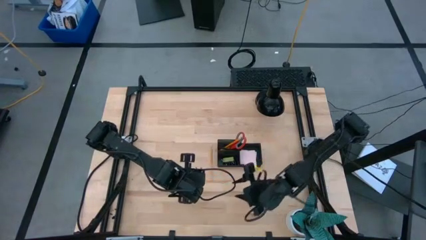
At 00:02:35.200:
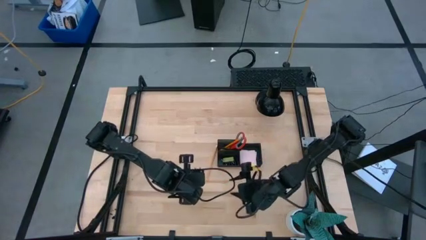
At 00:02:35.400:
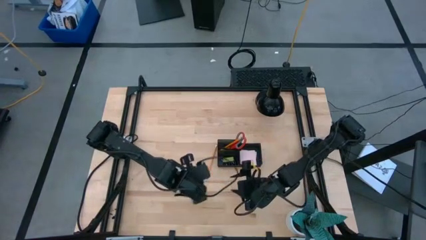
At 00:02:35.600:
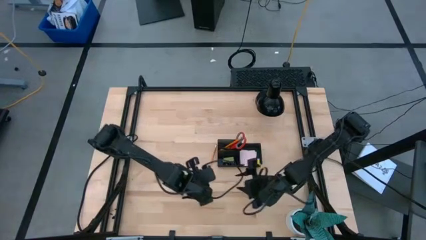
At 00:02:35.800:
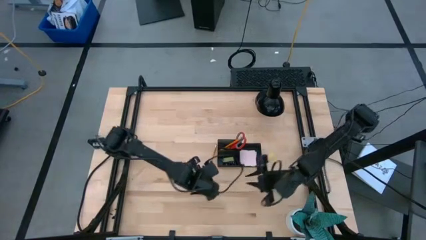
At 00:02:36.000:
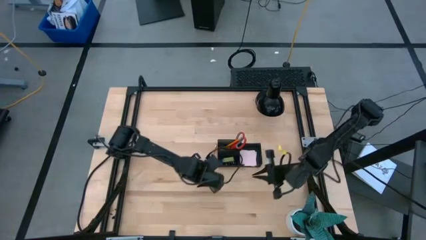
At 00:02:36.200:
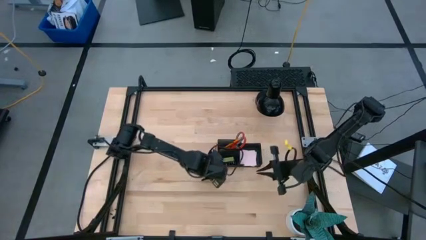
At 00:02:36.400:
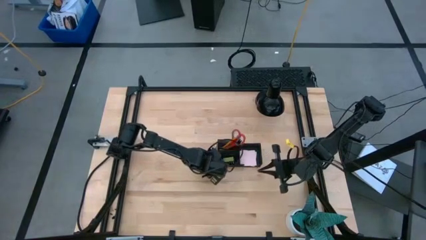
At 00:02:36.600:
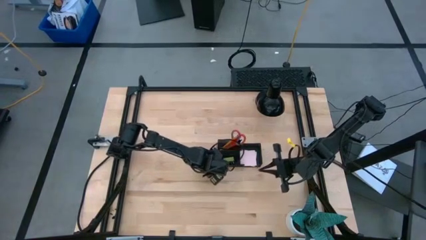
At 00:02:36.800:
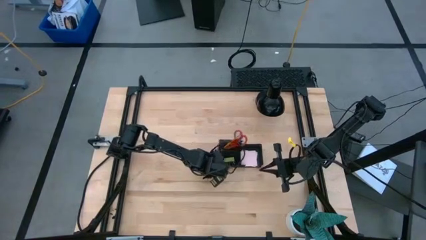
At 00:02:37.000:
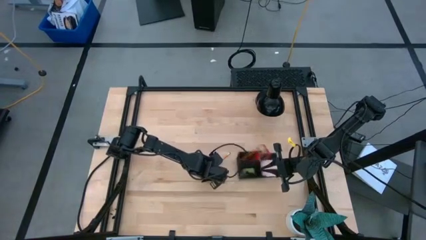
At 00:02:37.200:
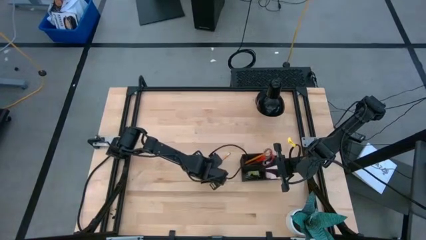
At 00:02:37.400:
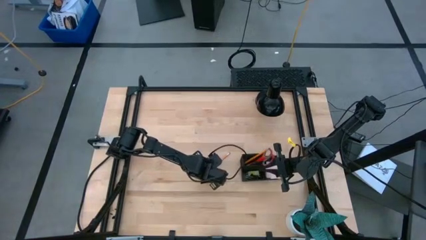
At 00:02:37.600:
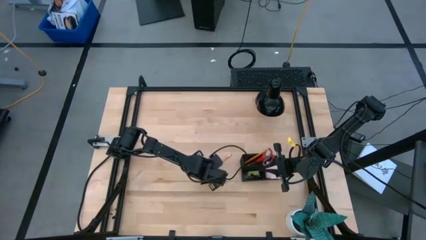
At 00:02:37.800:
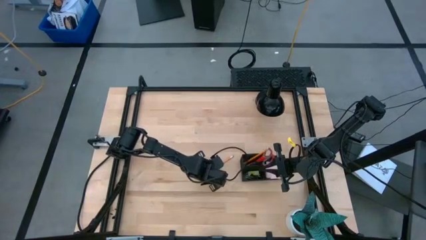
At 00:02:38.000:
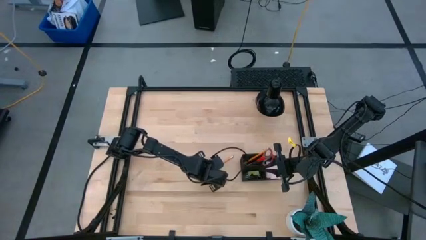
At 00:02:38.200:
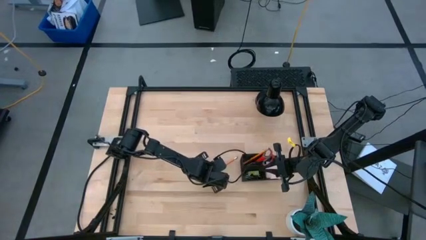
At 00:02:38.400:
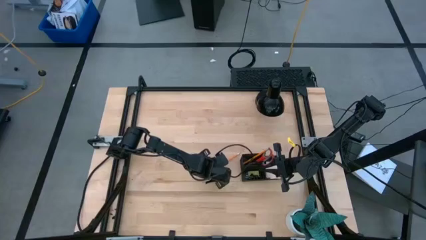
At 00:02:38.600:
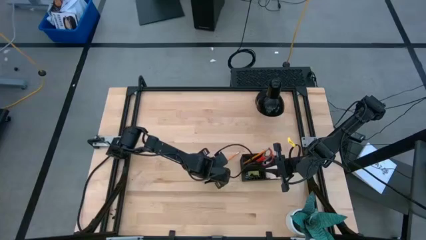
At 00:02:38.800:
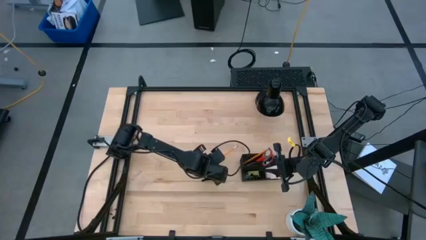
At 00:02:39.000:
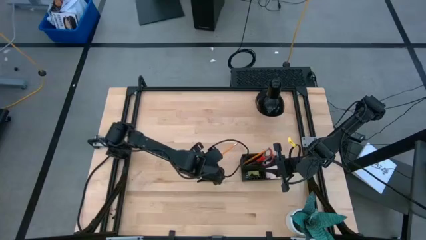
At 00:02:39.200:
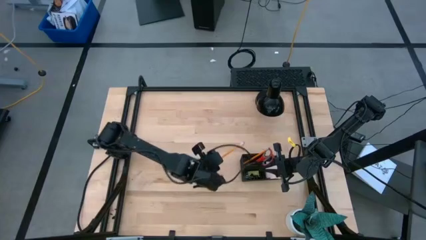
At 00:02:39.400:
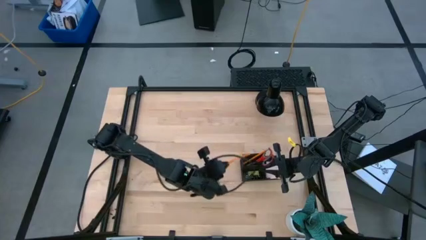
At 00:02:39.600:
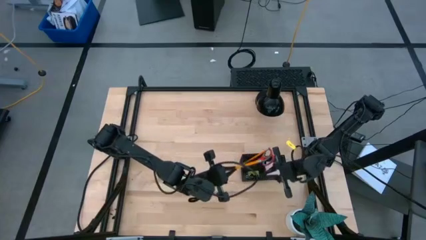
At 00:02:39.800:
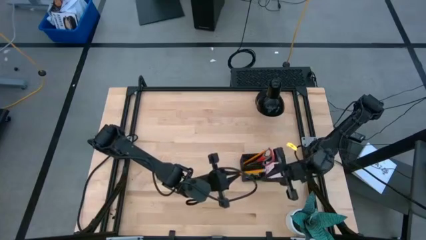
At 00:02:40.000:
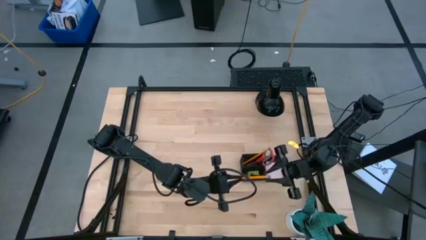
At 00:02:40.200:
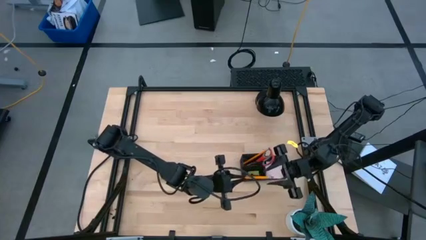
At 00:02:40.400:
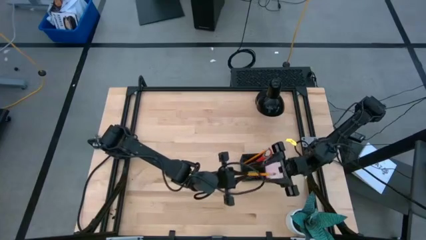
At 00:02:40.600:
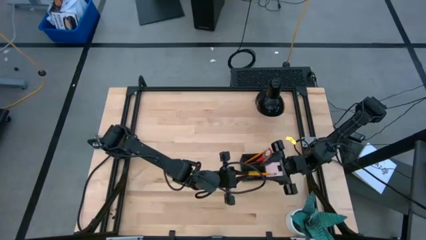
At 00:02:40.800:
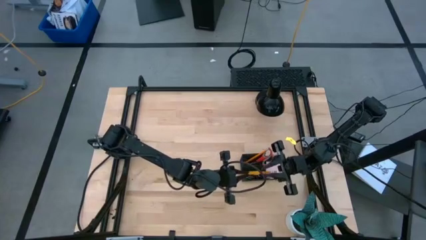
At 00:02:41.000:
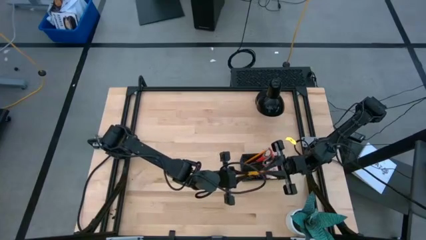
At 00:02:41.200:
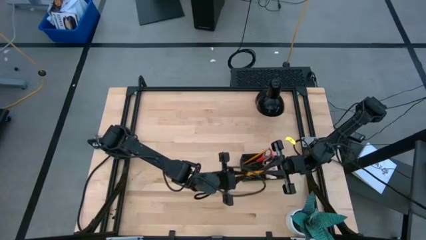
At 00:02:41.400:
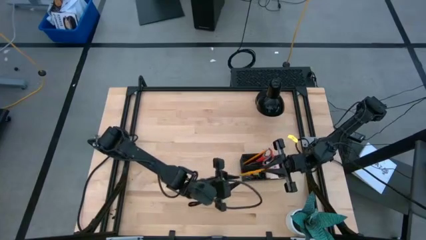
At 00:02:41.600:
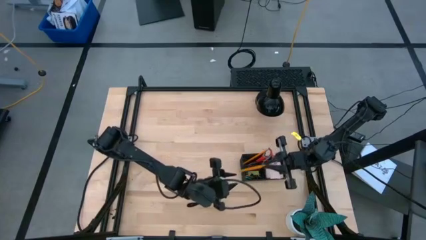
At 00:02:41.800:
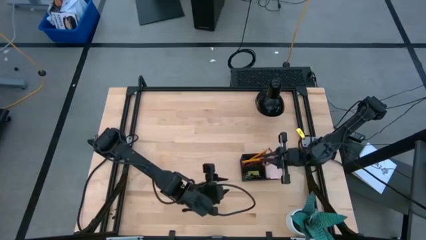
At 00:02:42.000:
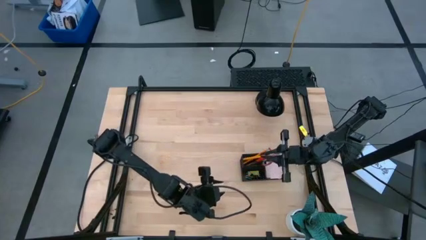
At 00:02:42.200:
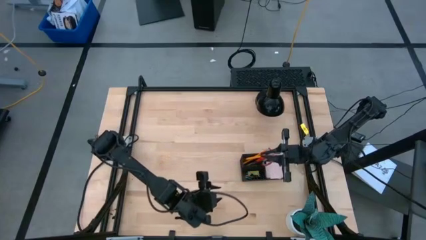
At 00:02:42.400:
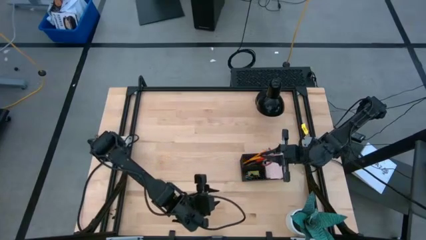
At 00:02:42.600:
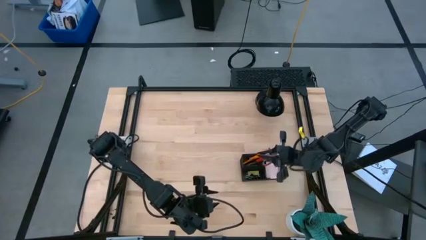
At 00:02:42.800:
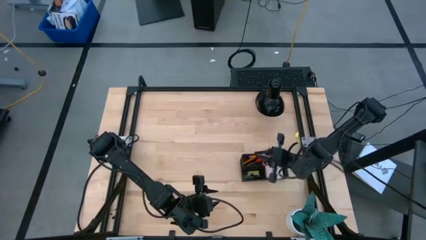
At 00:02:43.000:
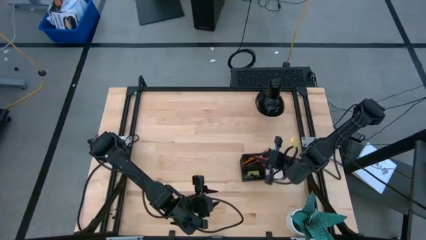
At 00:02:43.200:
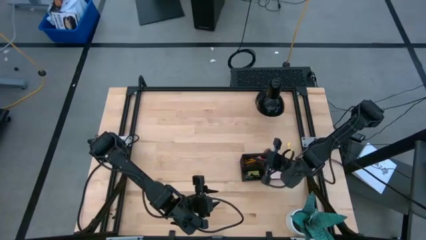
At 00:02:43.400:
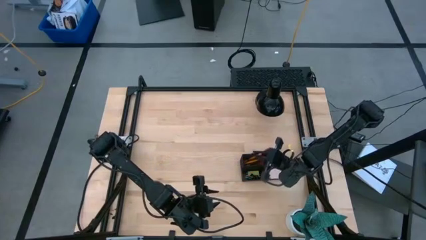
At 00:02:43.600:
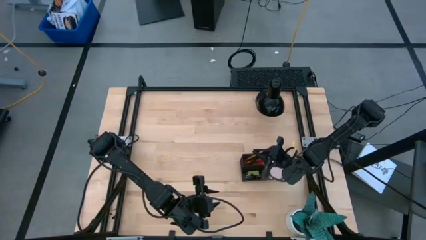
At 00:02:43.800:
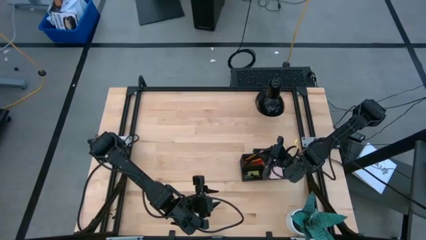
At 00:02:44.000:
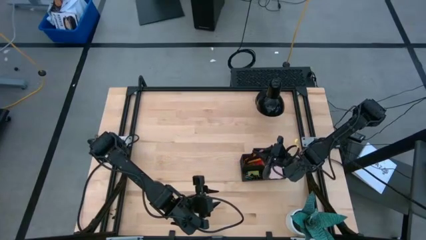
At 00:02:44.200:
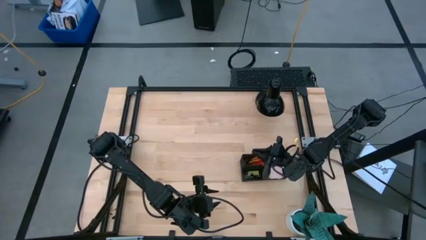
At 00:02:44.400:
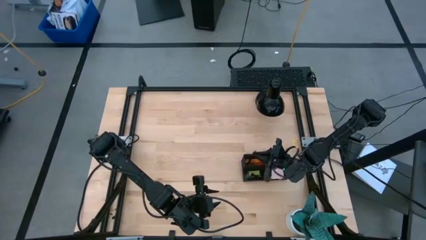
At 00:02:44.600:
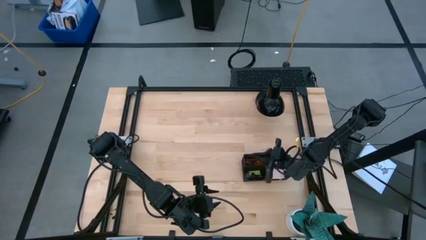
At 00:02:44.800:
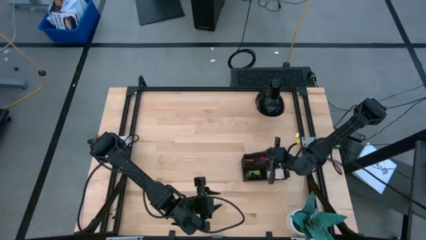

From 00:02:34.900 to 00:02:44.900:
Task: Pick and place office supplies into organizer
Put the yellow pencil into the black desk organizer
